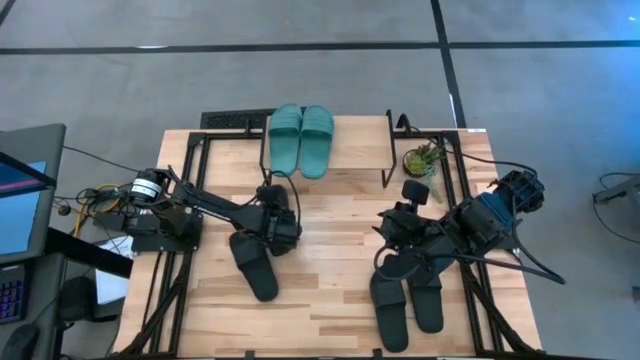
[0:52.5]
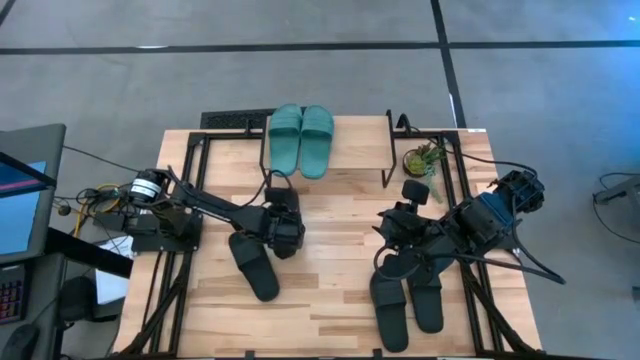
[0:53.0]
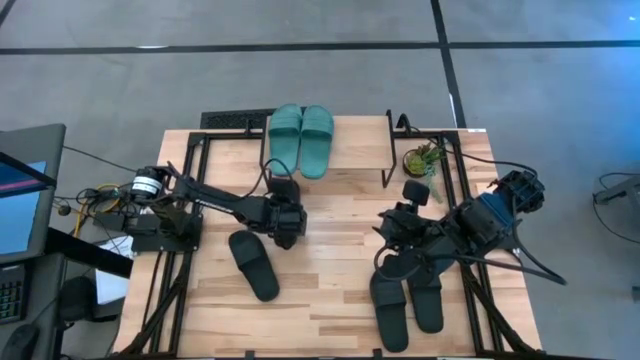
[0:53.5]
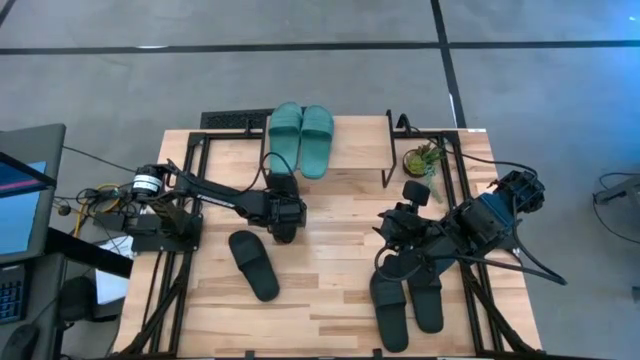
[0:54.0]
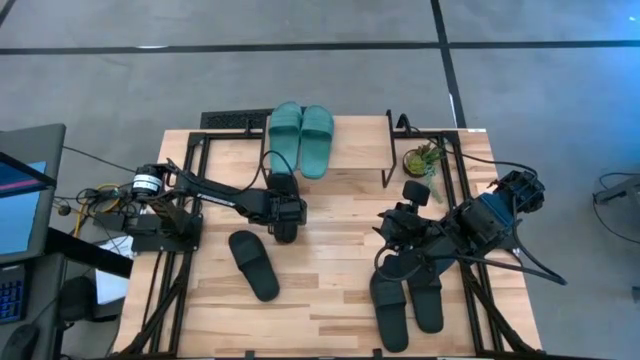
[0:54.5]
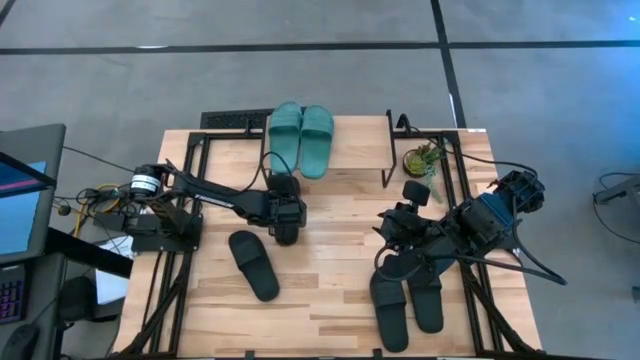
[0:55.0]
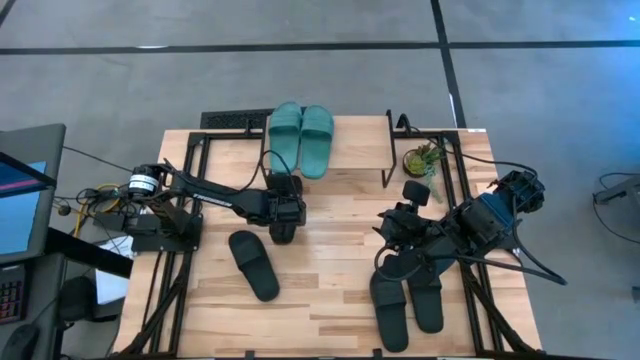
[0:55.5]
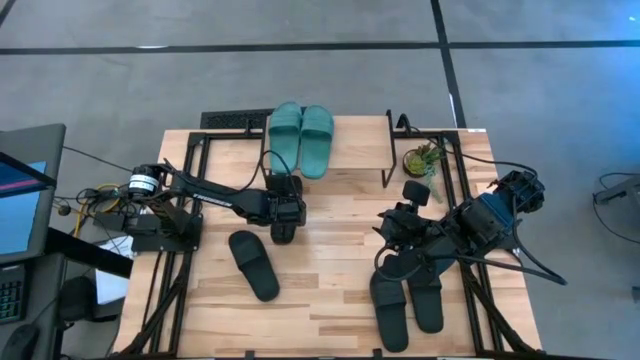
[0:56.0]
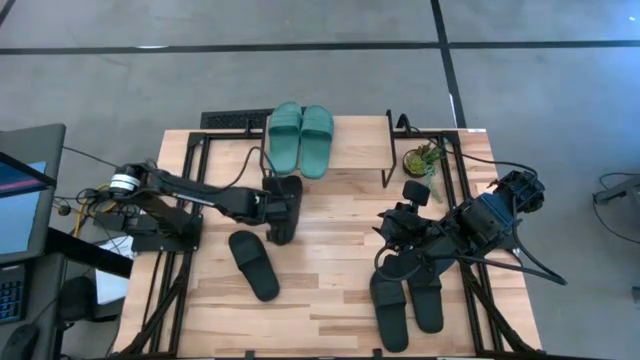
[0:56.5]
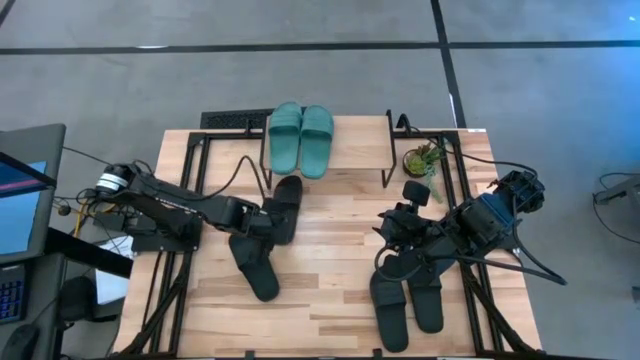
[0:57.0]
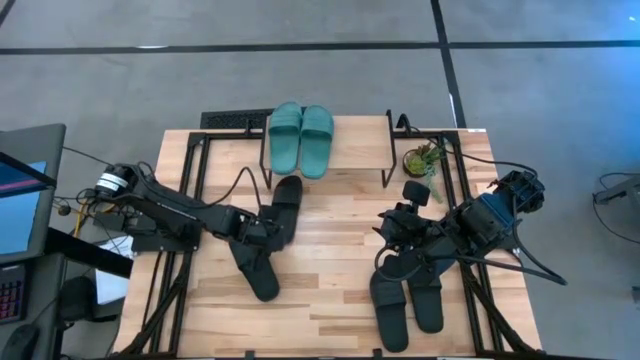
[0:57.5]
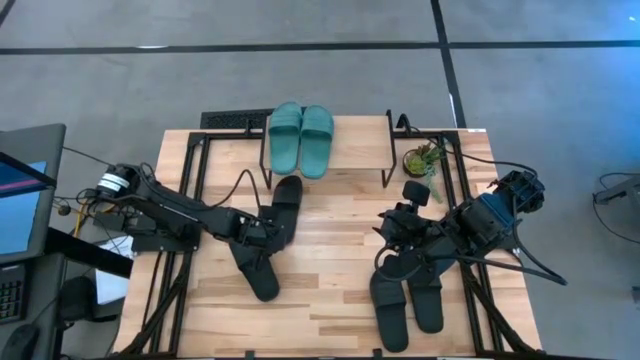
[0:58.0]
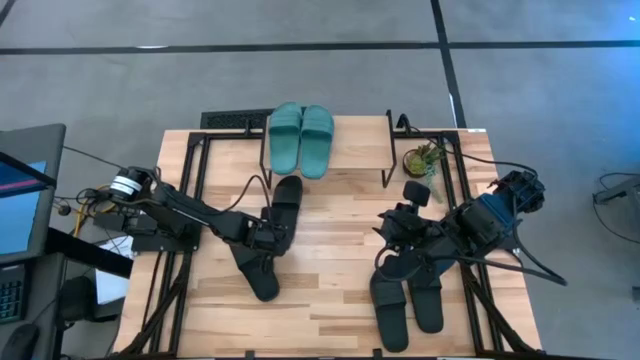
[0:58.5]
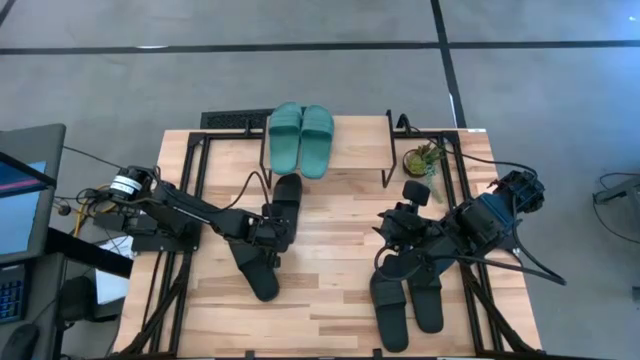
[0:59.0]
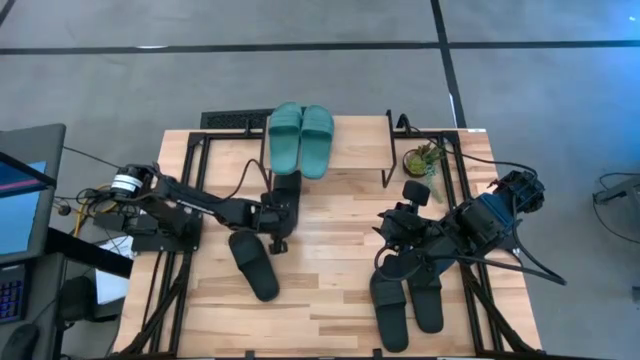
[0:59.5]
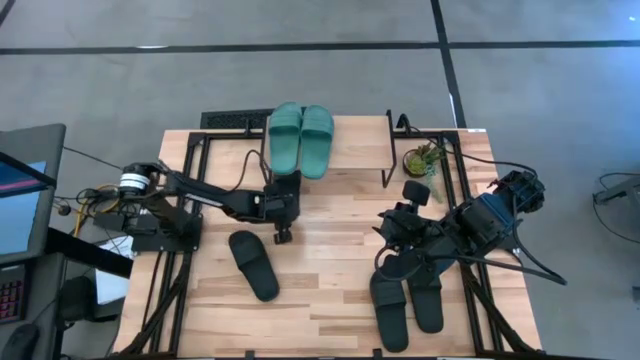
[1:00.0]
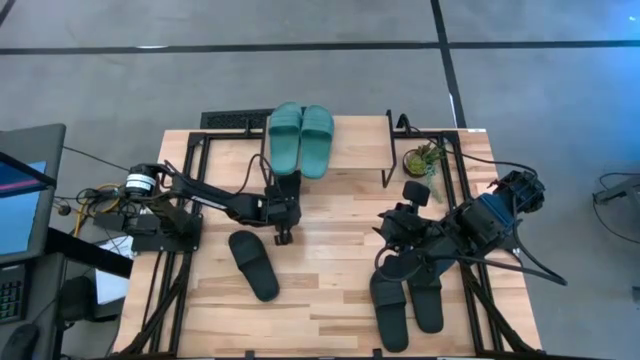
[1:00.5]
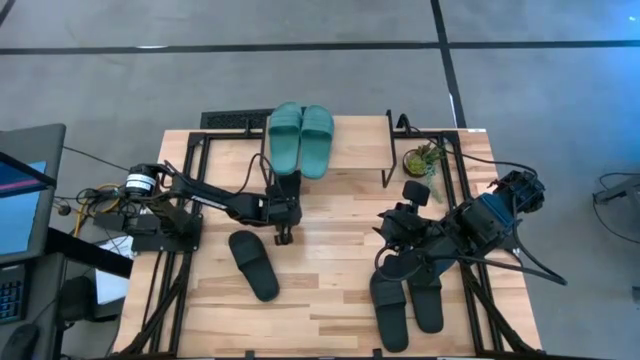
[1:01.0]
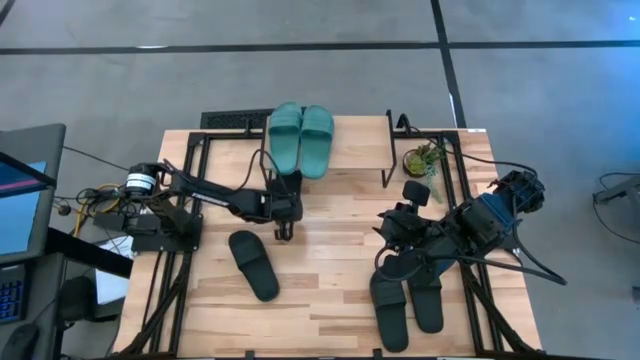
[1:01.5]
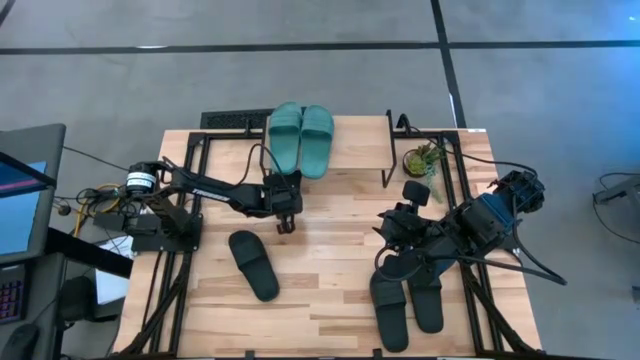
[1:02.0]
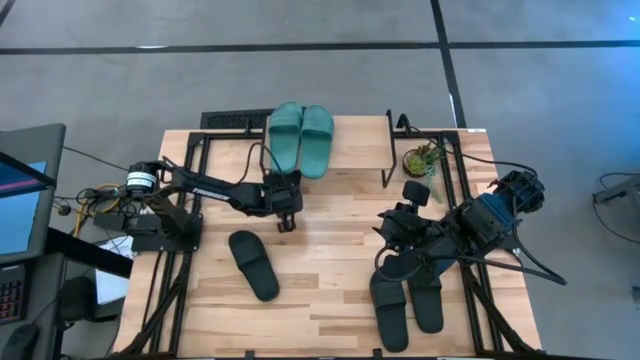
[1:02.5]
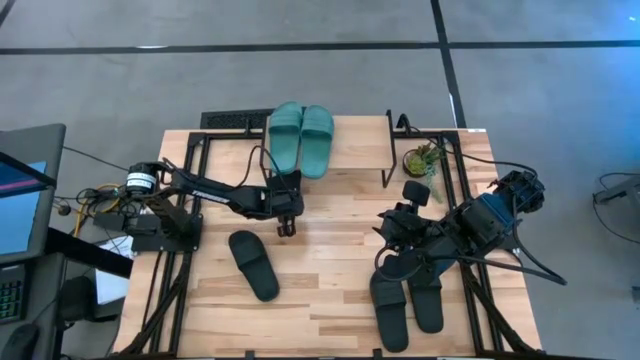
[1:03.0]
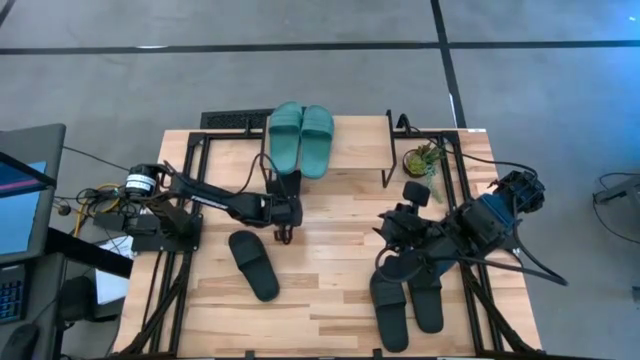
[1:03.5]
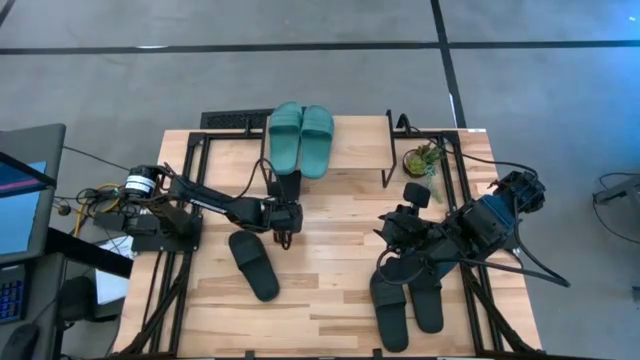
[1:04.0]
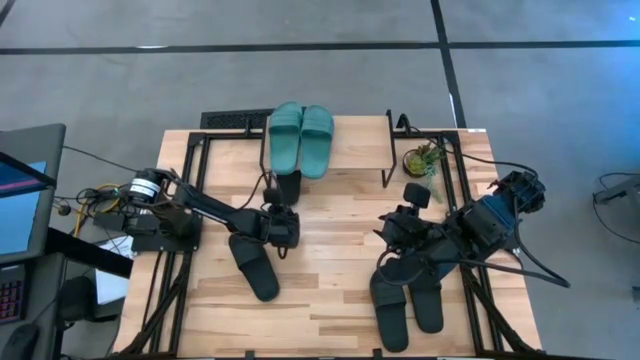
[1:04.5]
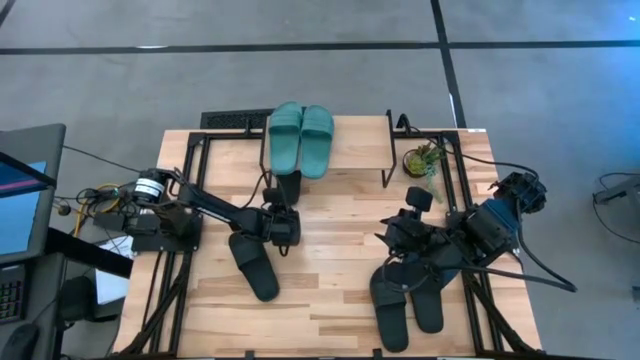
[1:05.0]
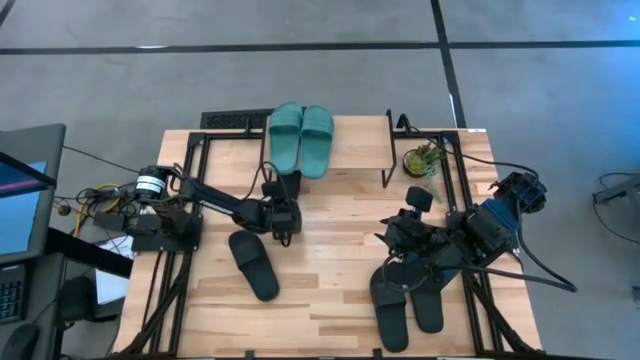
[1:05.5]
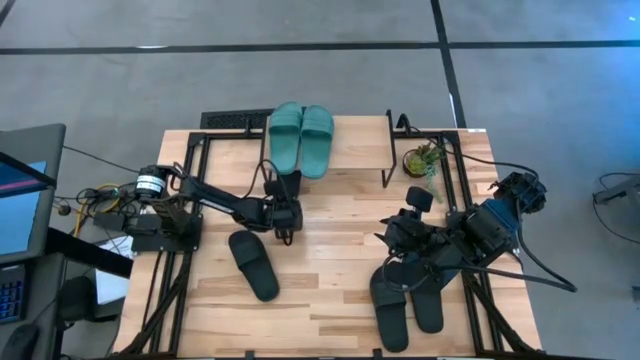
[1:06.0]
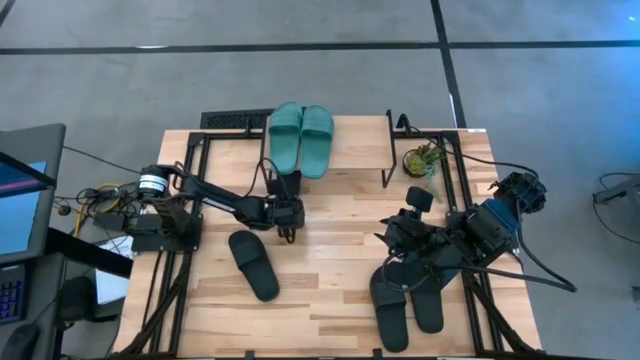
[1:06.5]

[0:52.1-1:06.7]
Task: Pick and place slides into the shelf
Put the left black slide under the shelf

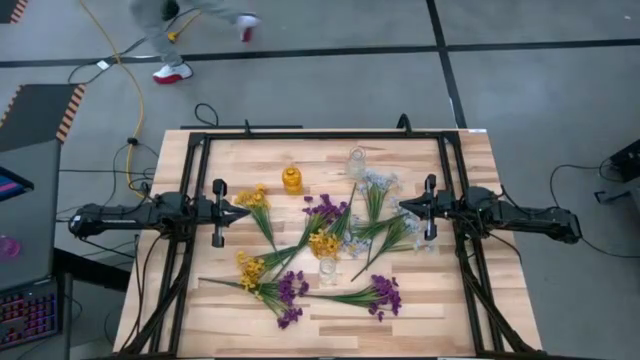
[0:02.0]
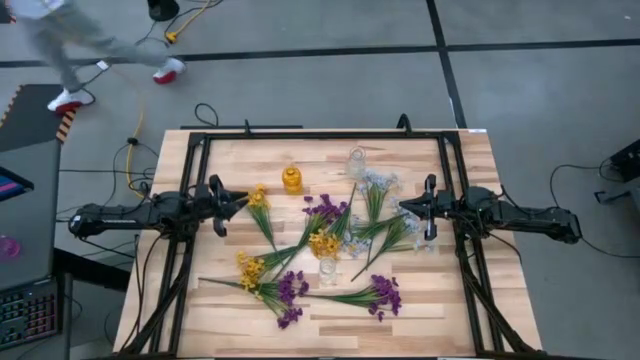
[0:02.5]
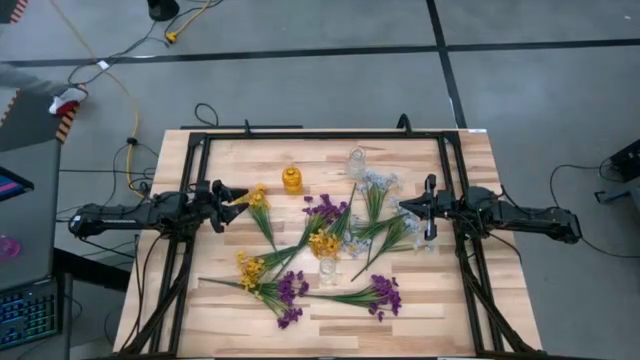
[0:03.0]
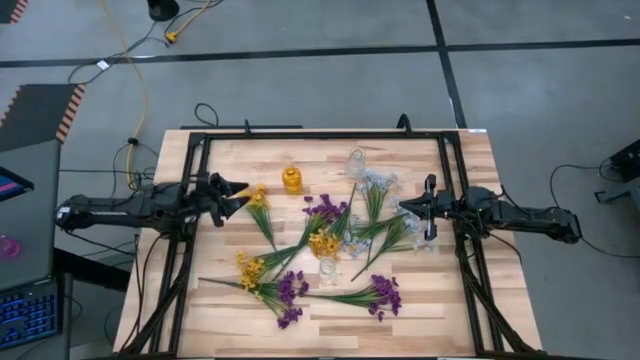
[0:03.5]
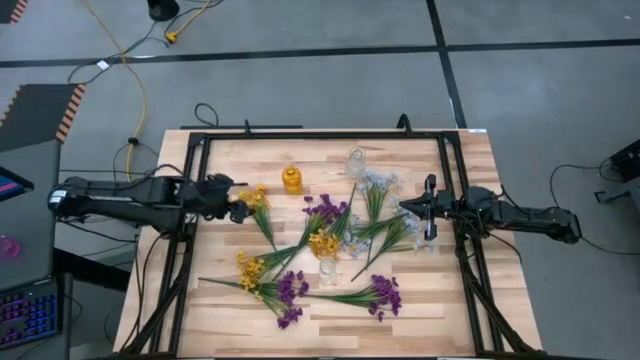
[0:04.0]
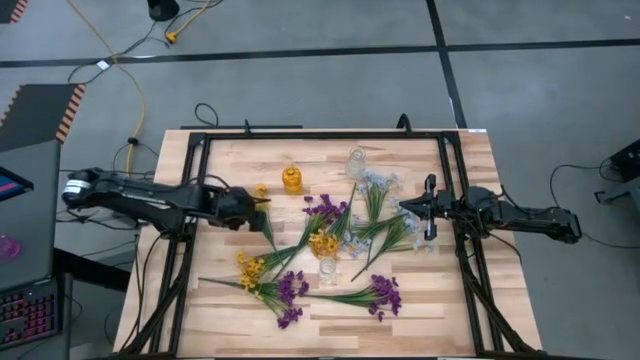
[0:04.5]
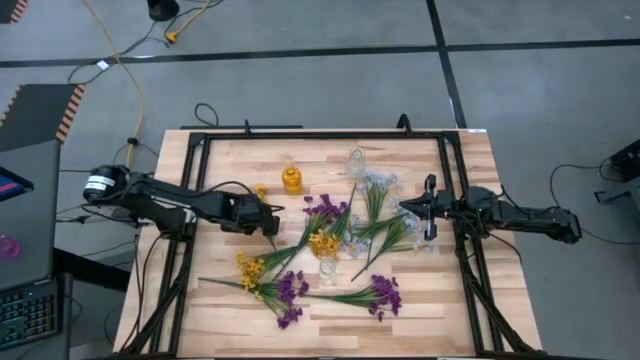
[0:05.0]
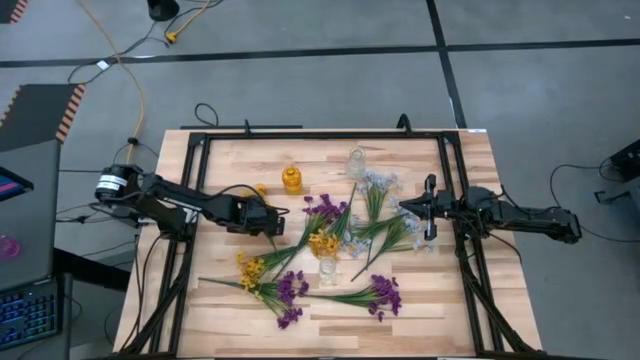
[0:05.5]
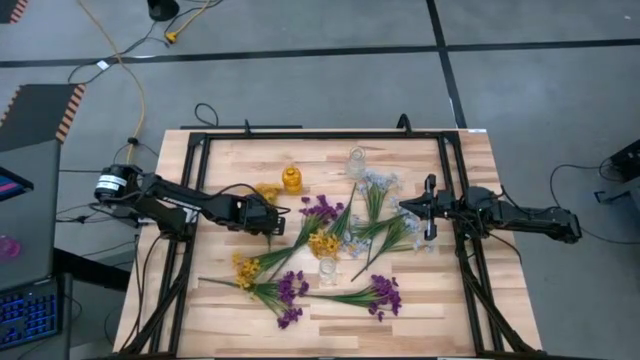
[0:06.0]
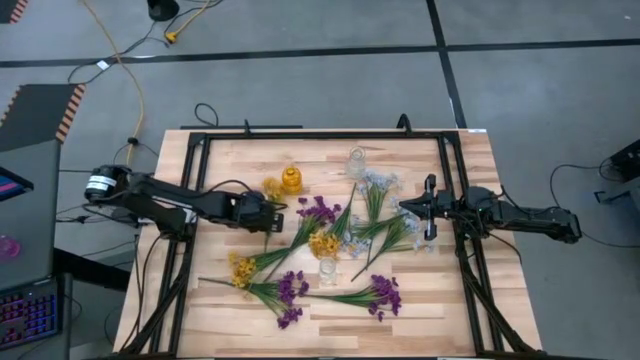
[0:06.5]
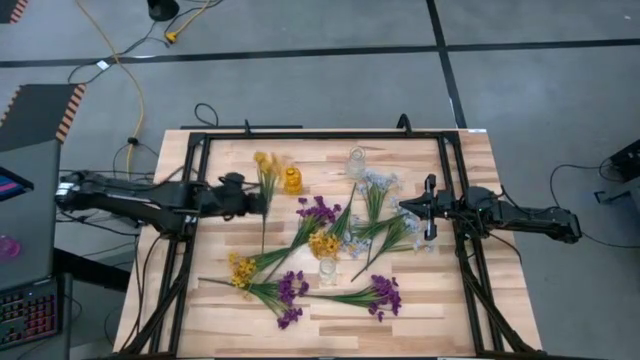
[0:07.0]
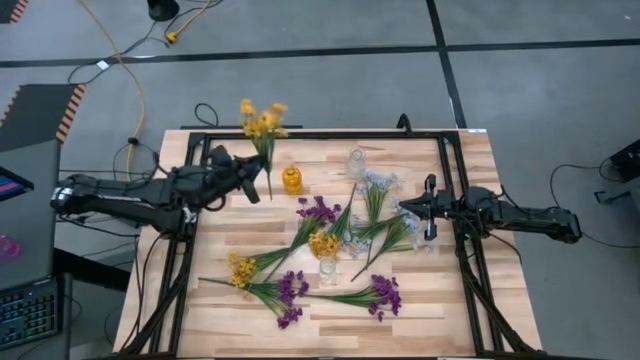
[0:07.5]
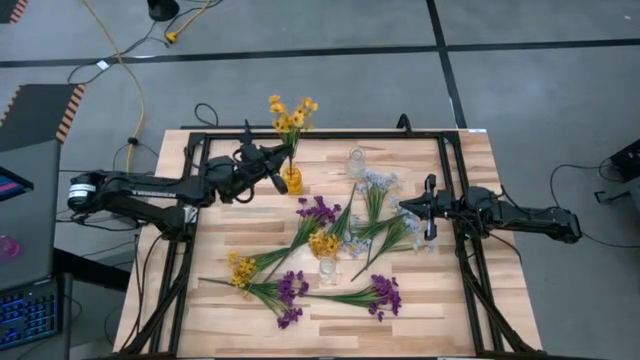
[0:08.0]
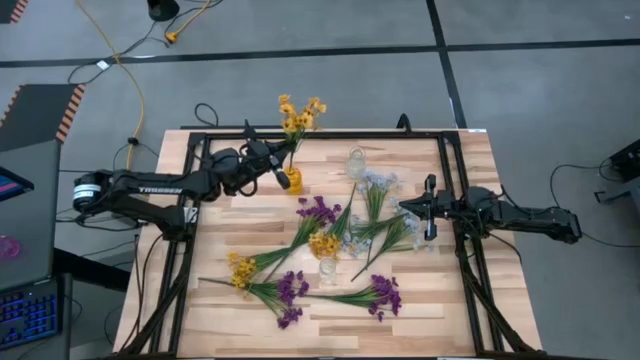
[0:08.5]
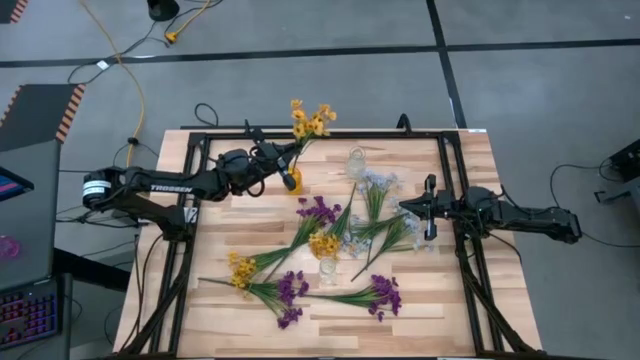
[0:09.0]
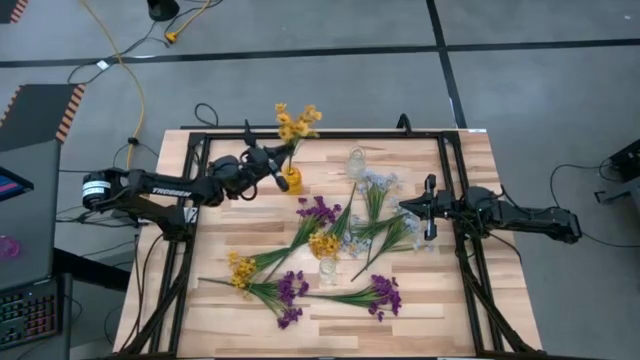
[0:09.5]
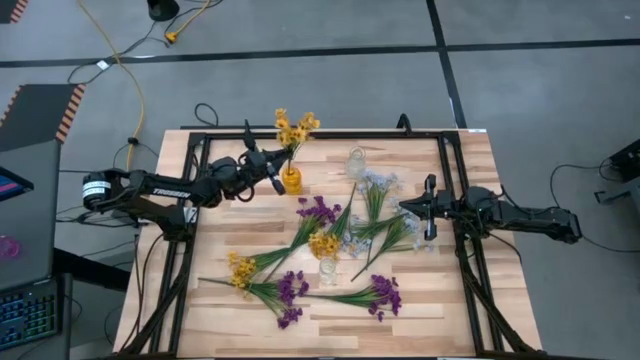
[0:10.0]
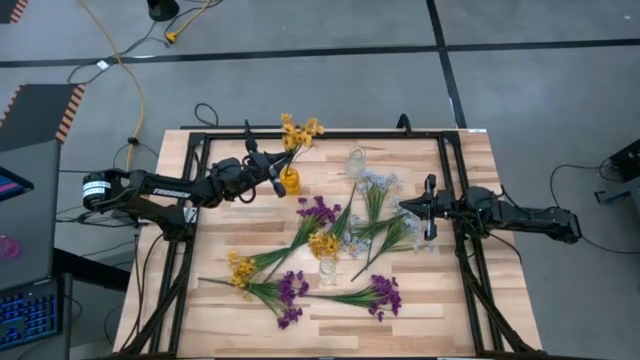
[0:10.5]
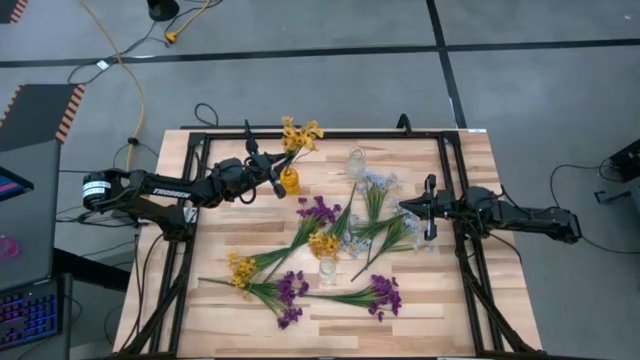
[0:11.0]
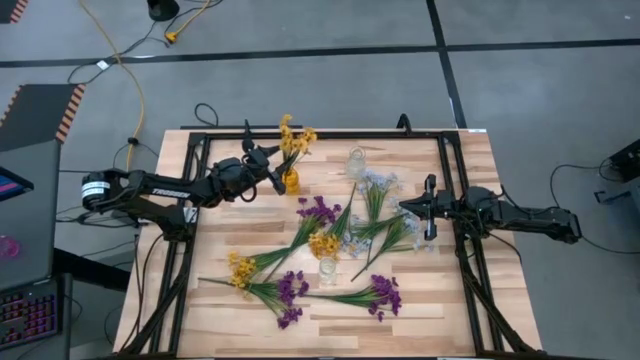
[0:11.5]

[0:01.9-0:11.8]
Task: Sort flowers into vase by color
Put the top left yellow flowers into the yellow vase
